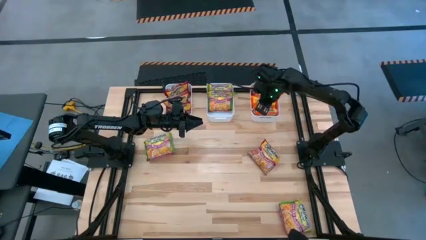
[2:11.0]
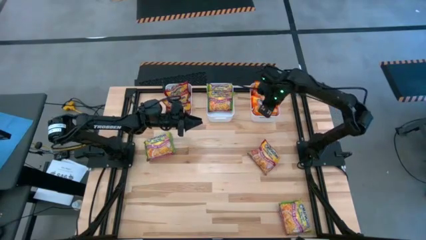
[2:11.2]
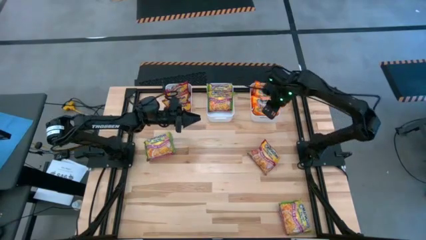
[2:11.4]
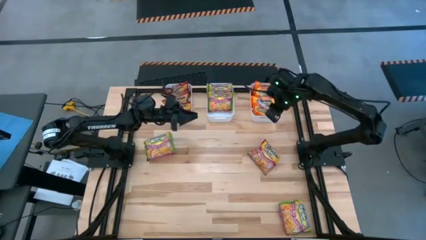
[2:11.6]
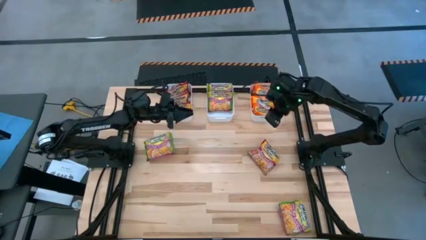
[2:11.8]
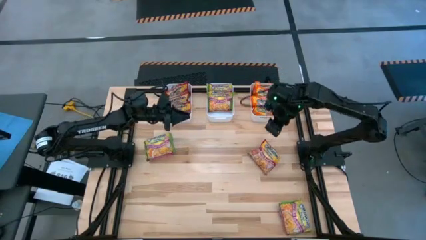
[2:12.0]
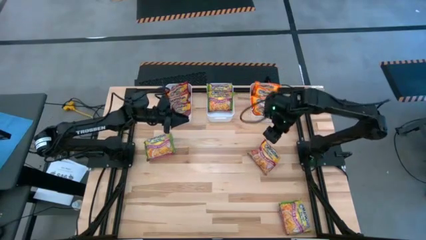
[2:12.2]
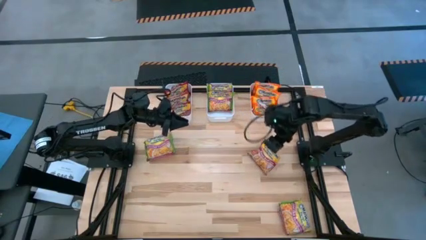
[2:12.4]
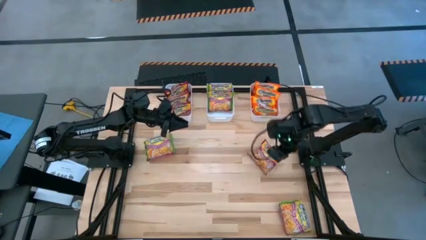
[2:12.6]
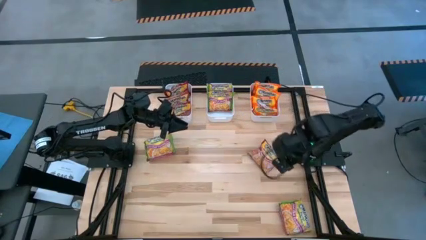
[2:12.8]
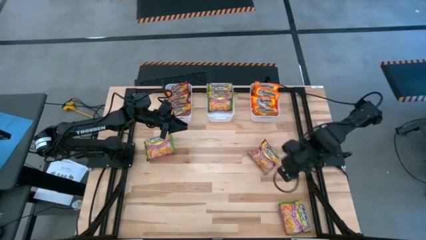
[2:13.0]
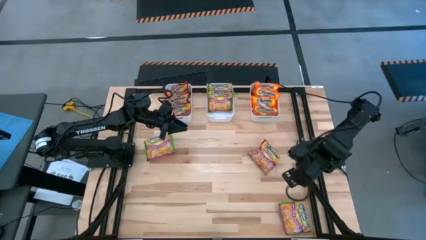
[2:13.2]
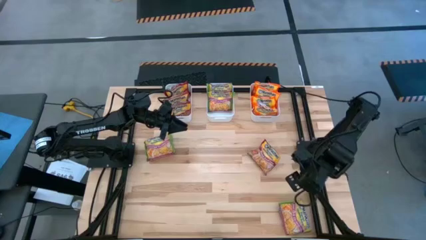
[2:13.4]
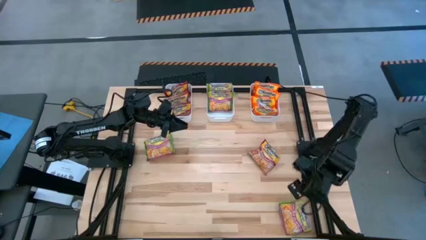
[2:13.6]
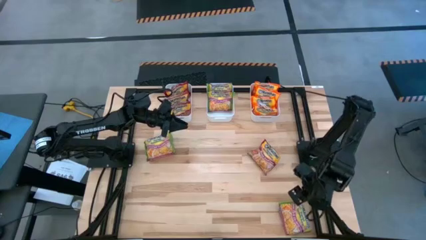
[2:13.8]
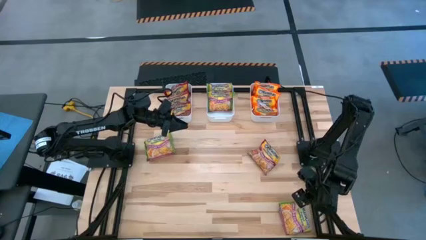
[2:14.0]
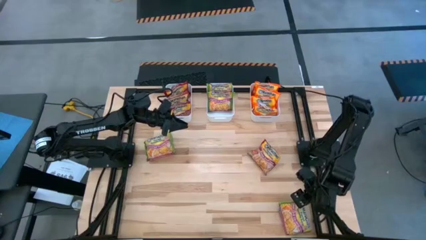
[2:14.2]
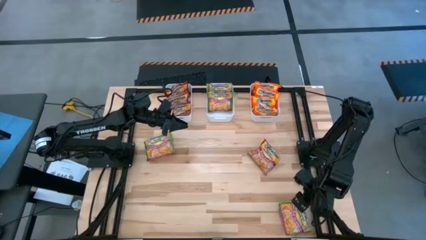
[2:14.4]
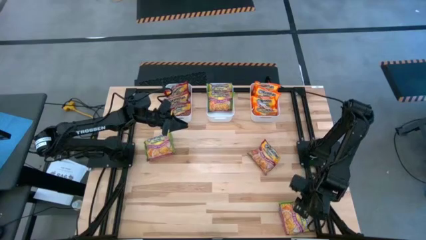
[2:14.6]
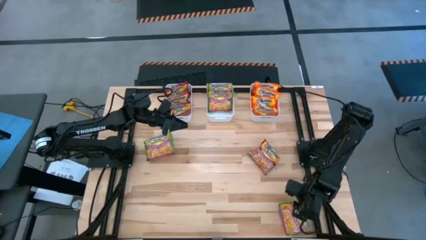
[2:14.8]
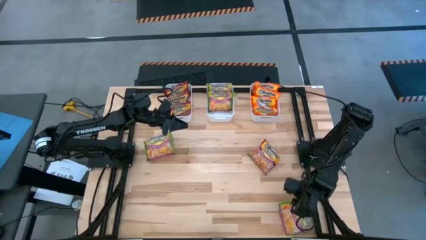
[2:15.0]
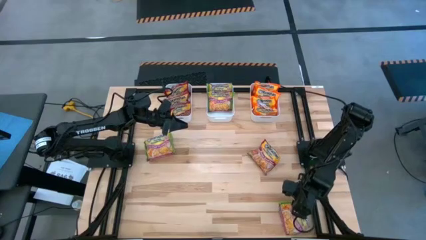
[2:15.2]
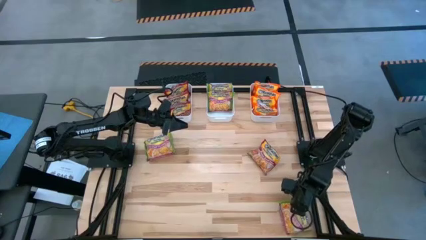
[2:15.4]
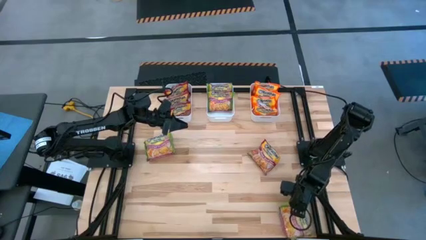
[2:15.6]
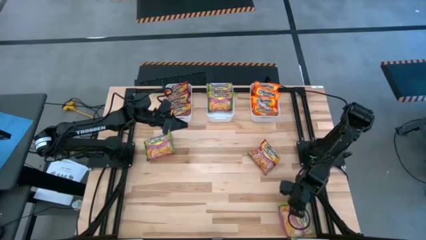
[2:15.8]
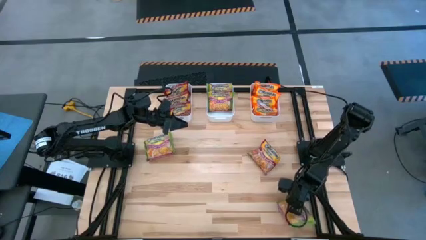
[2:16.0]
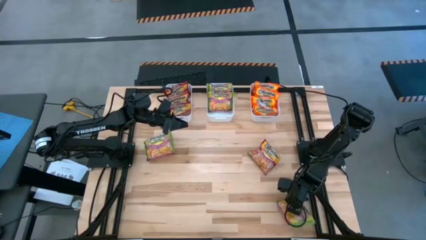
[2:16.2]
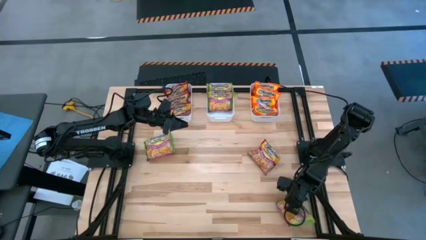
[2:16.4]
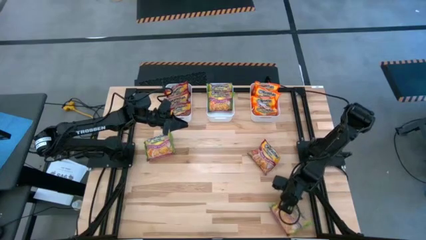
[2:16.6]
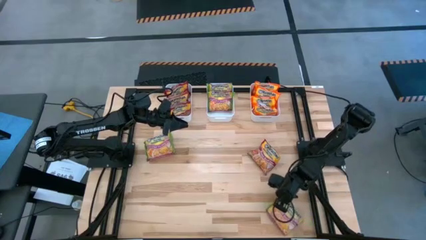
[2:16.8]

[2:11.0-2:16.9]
Task: Sort Maruchan noodles
Put the green noodle pack into the middle white bin

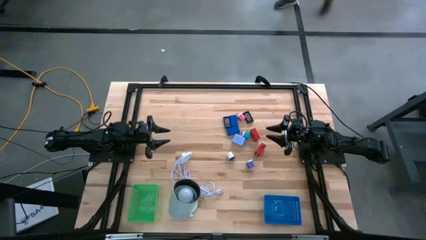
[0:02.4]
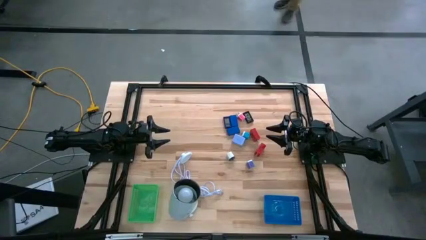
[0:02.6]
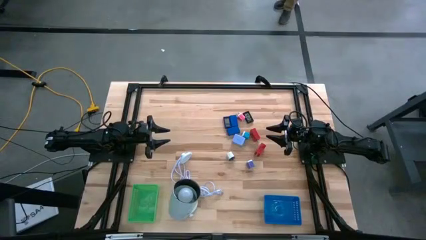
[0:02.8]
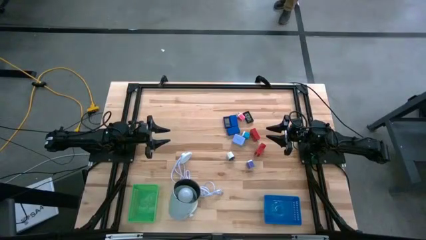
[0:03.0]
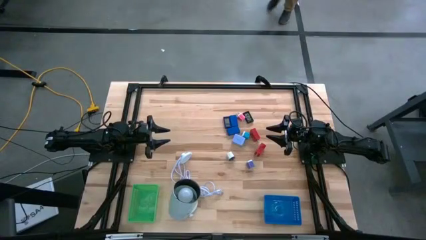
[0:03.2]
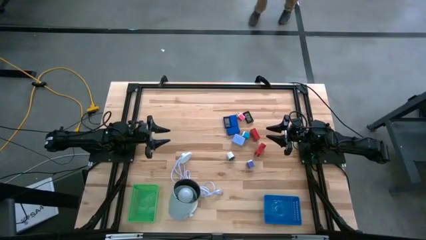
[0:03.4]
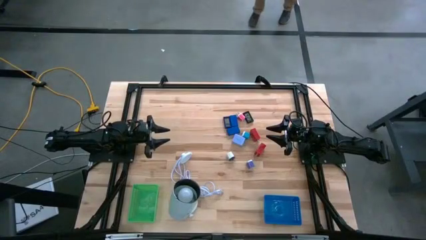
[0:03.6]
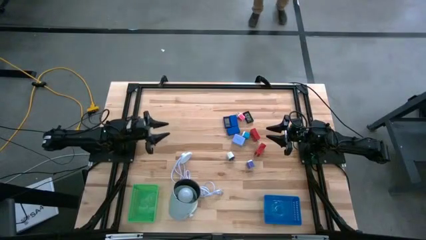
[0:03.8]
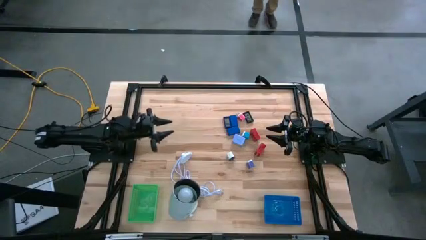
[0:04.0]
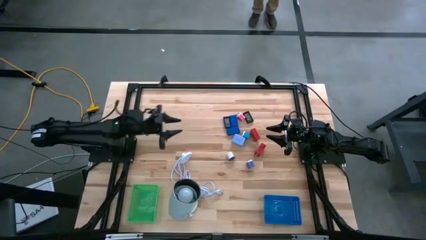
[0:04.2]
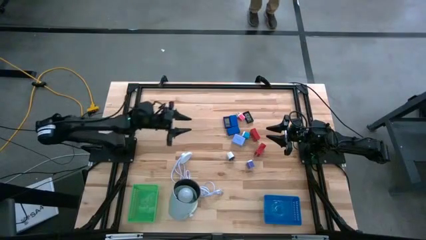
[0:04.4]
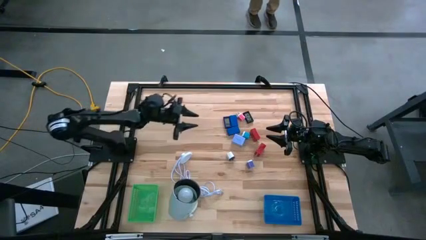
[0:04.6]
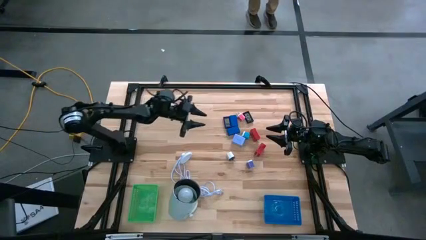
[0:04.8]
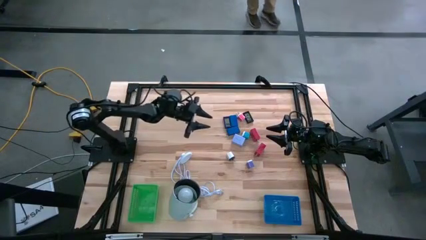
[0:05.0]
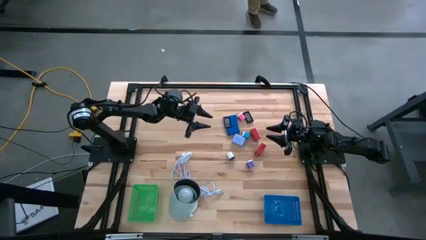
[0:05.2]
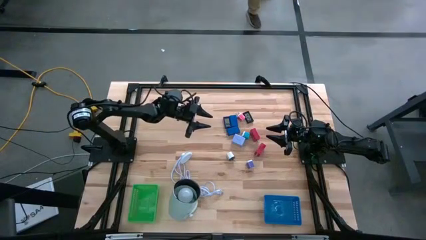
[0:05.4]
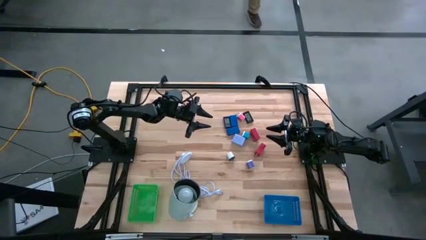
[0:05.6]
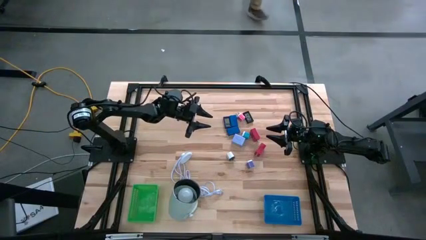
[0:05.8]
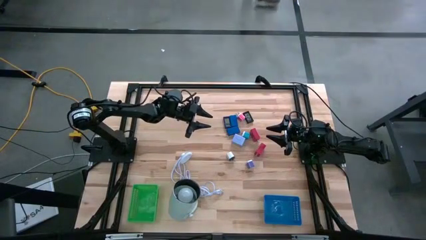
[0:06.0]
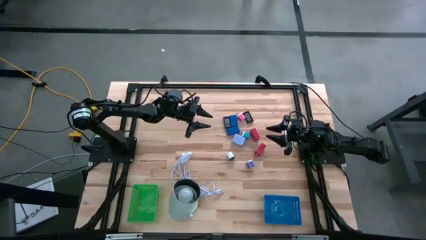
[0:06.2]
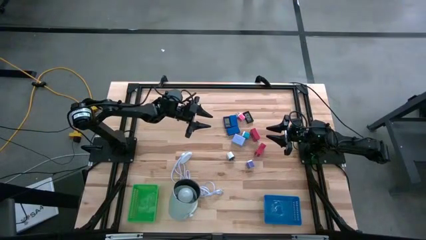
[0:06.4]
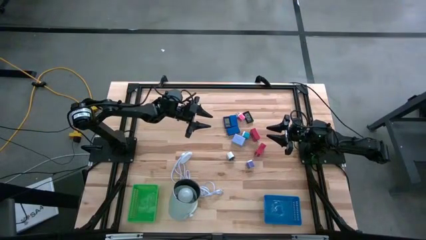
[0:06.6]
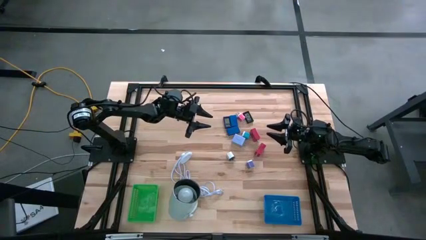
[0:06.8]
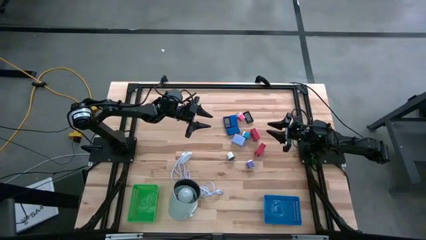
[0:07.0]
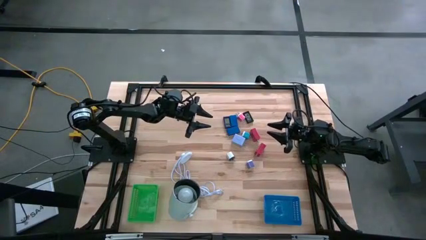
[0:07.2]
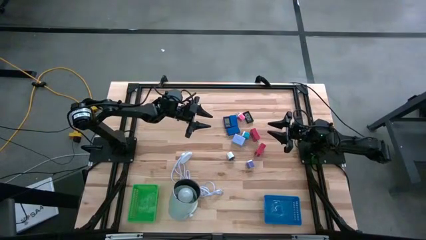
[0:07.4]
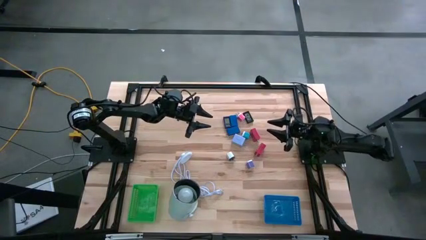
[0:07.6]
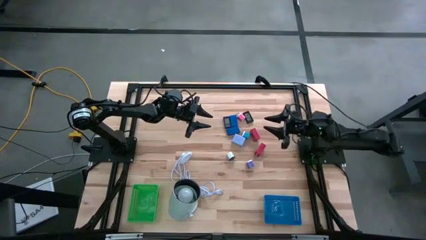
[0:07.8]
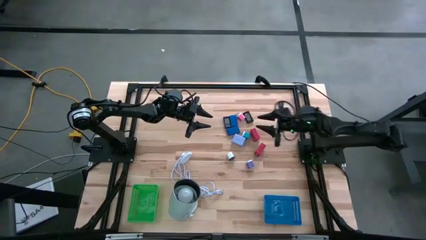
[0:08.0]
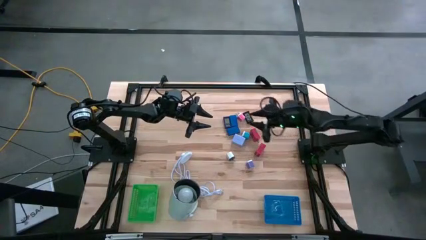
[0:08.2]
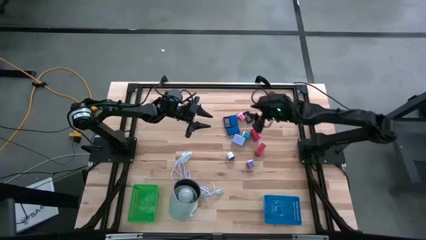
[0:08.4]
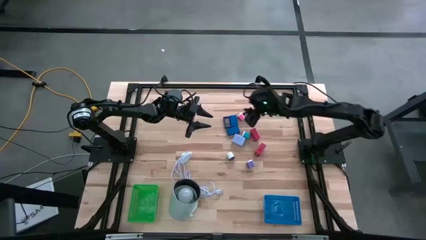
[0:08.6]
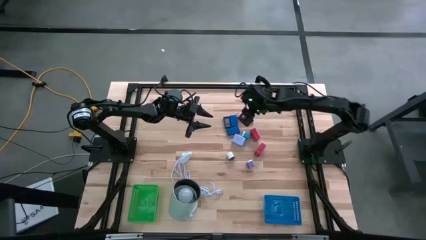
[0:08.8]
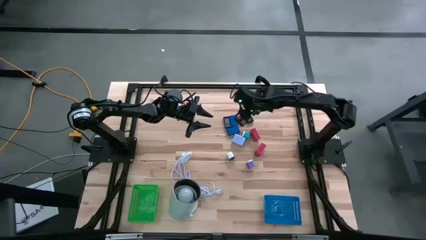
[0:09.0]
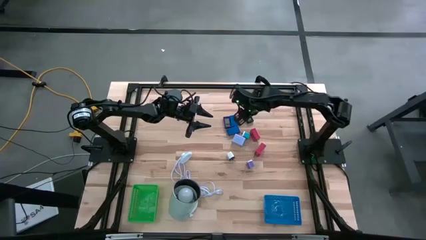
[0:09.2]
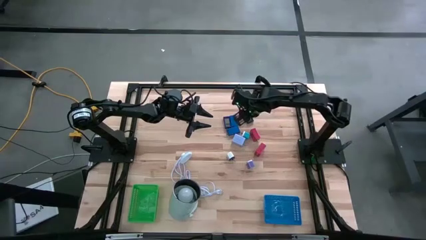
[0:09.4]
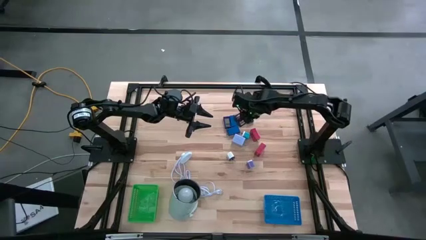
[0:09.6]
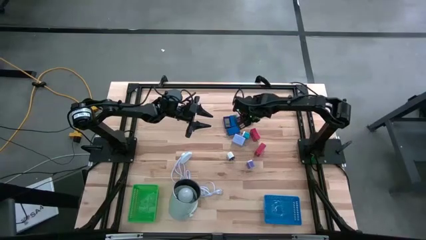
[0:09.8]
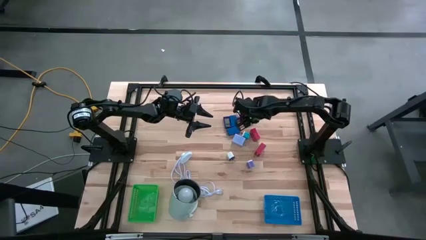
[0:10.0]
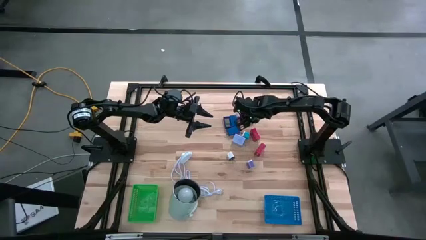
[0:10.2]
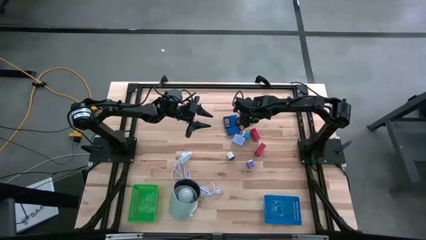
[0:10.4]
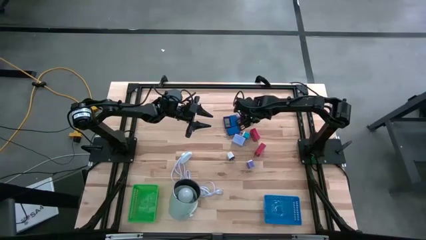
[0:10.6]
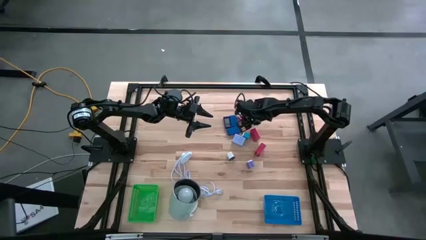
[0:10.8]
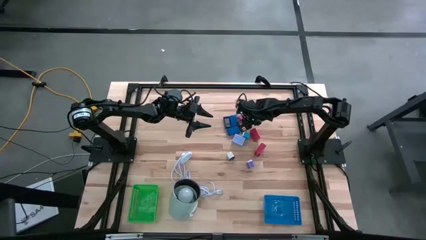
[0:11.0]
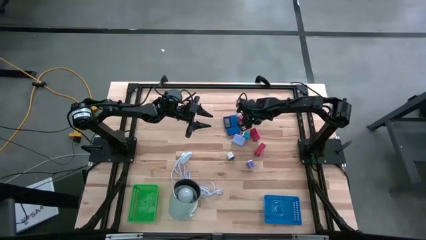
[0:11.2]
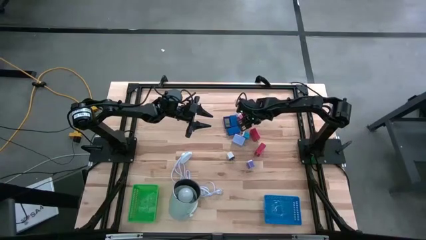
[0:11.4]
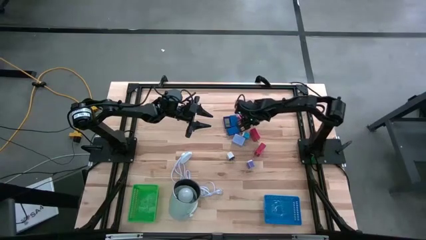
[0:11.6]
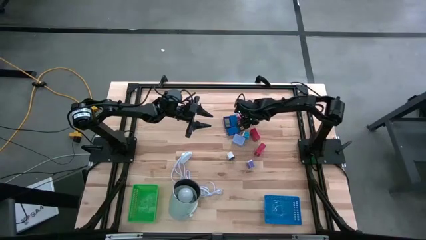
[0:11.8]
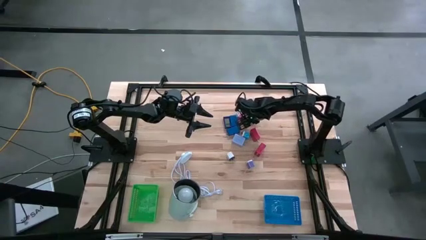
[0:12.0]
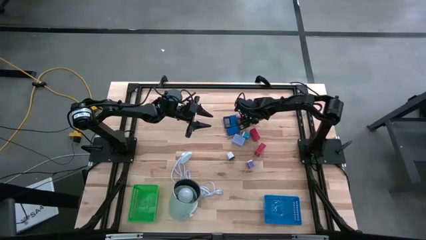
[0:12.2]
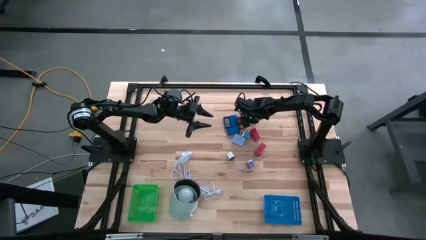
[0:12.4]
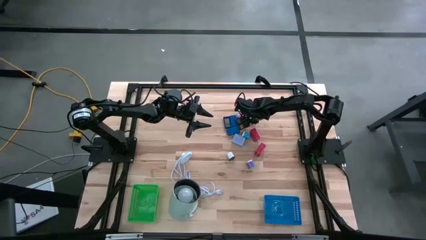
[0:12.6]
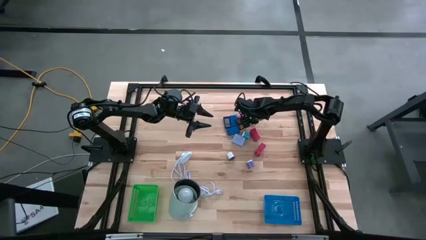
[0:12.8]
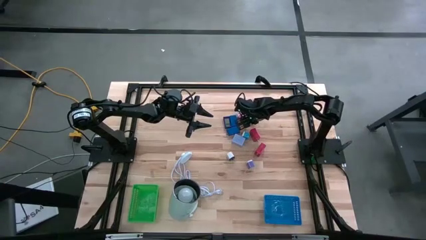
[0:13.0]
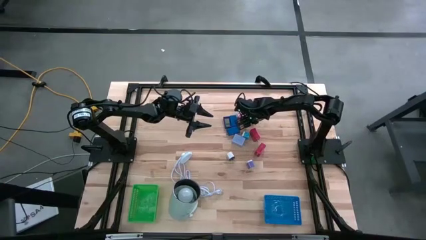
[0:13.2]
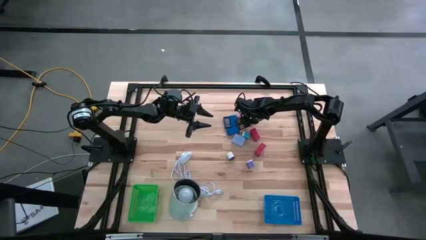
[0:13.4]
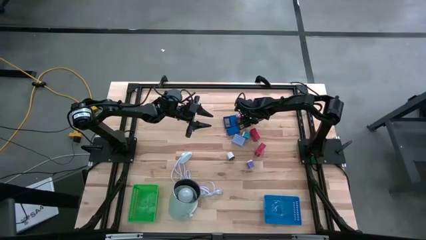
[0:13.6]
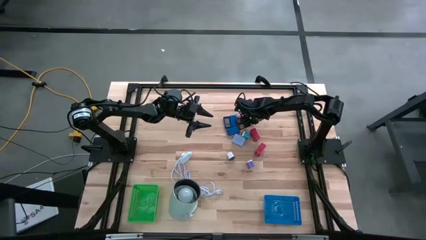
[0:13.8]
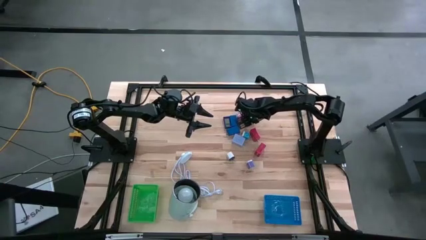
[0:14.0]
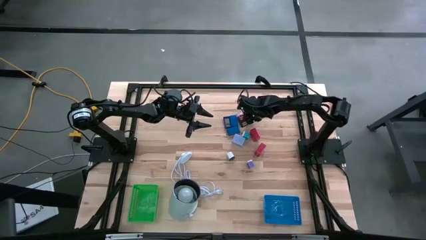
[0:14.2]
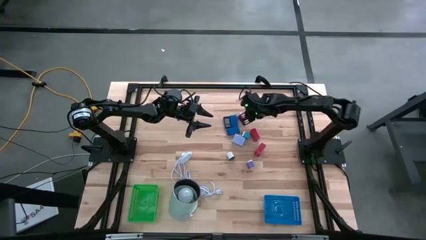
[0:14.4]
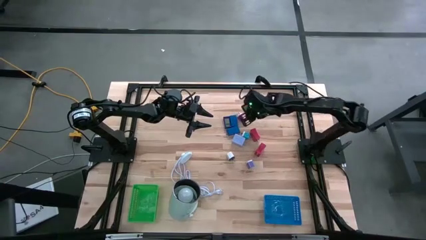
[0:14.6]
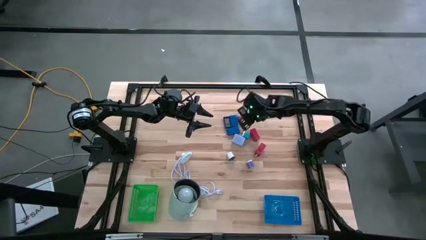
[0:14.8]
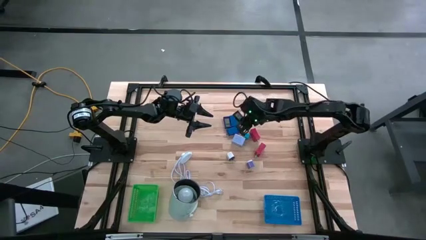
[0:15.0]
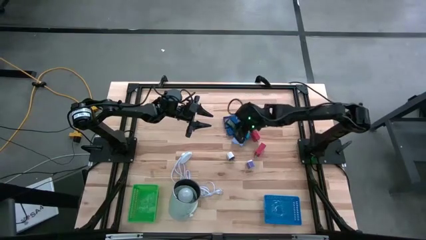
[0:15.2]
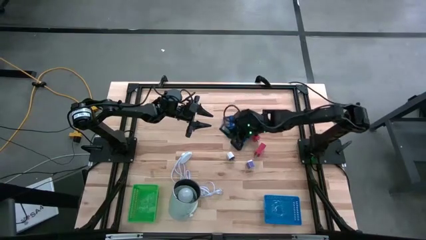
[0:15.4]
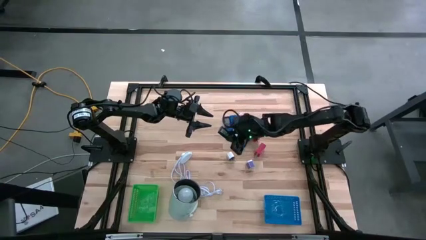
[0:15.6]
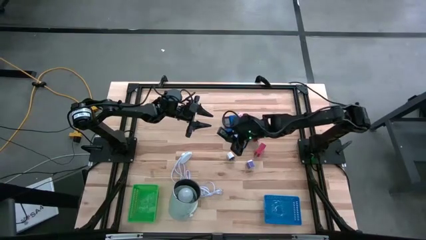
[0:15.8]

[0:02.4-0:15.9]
Task: Pick & Place Office items
Put the black digital timer into the green basket
